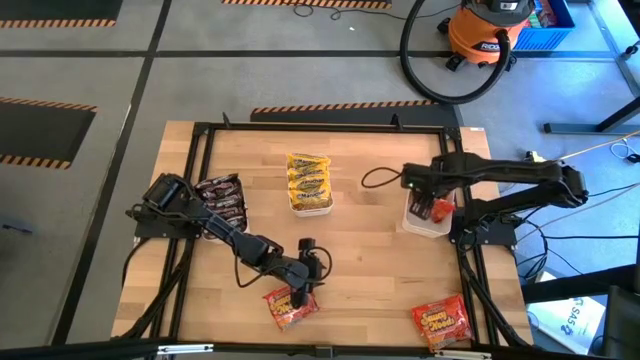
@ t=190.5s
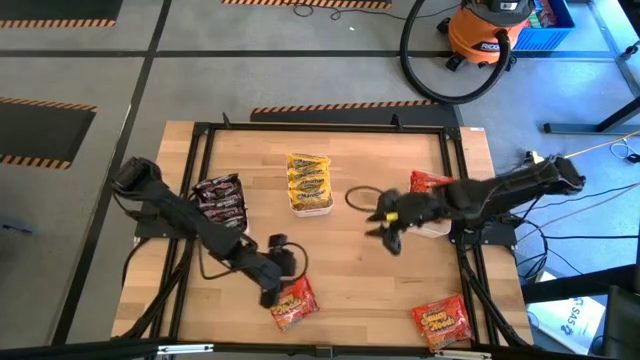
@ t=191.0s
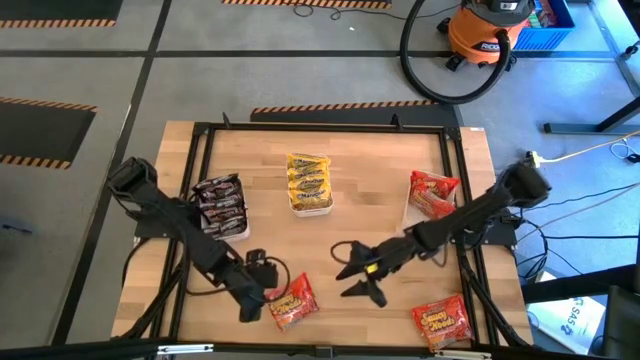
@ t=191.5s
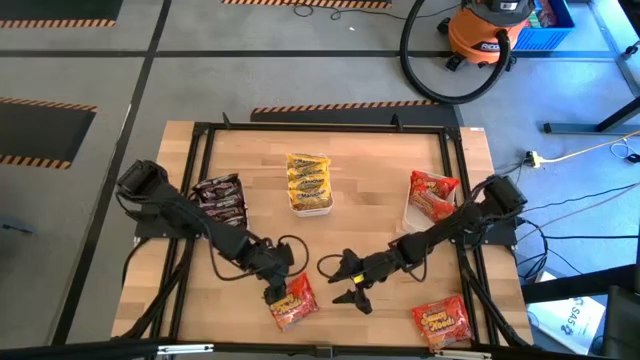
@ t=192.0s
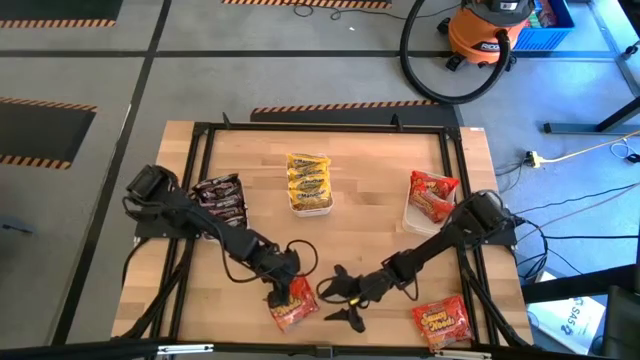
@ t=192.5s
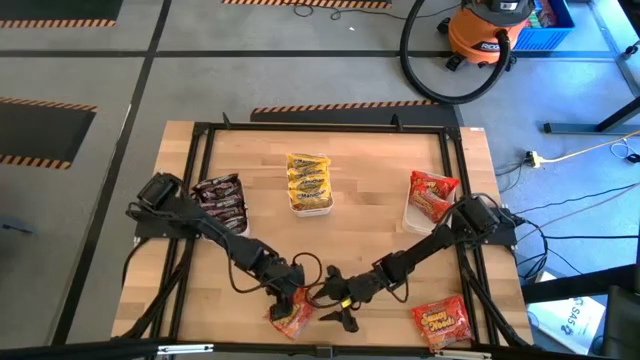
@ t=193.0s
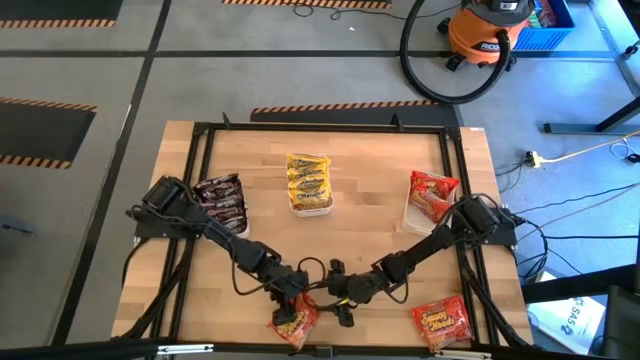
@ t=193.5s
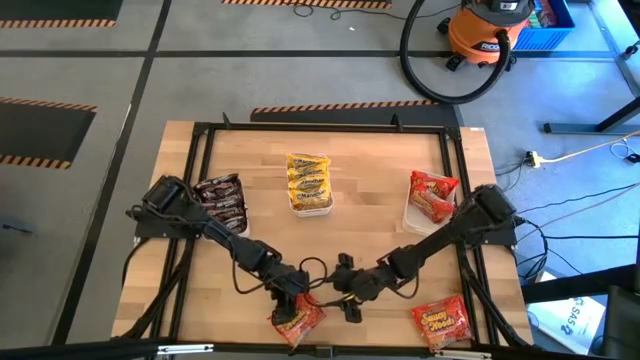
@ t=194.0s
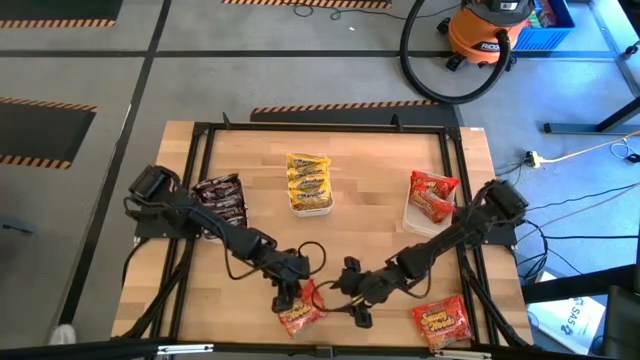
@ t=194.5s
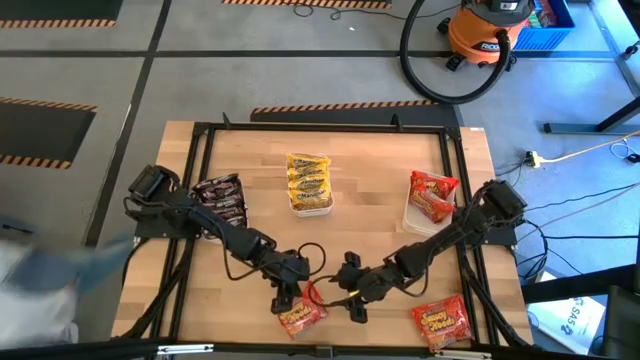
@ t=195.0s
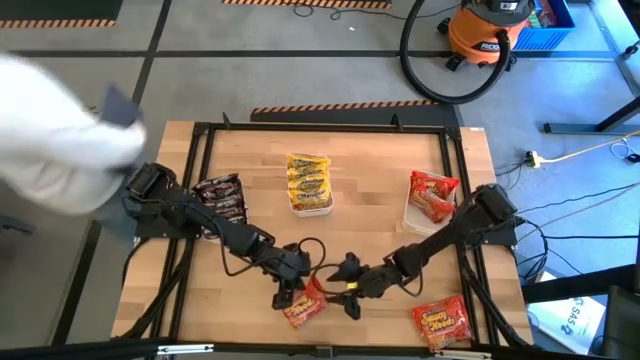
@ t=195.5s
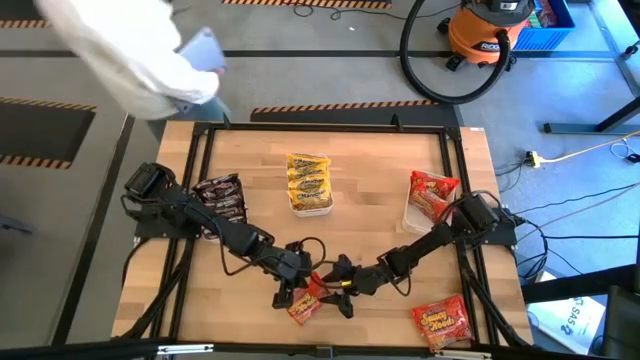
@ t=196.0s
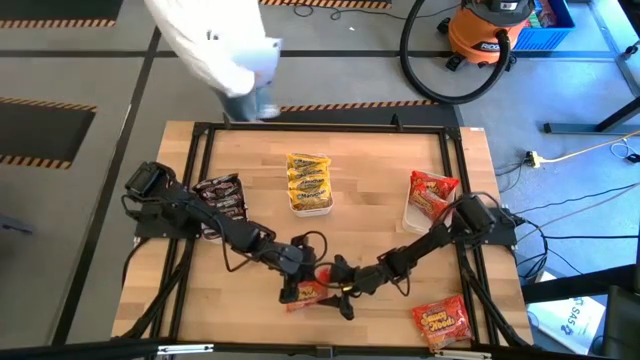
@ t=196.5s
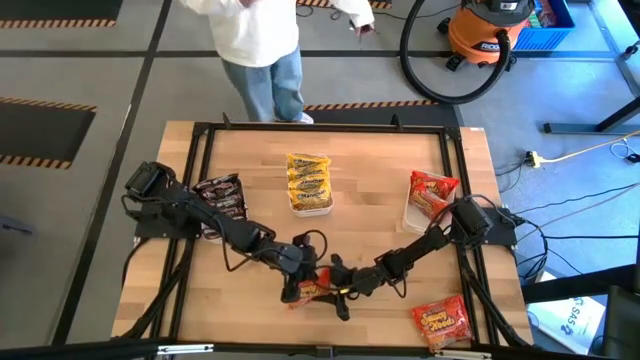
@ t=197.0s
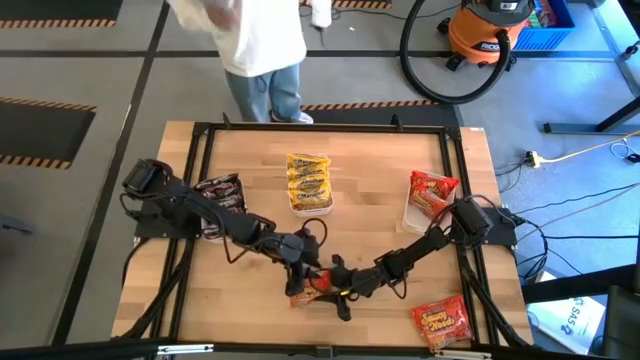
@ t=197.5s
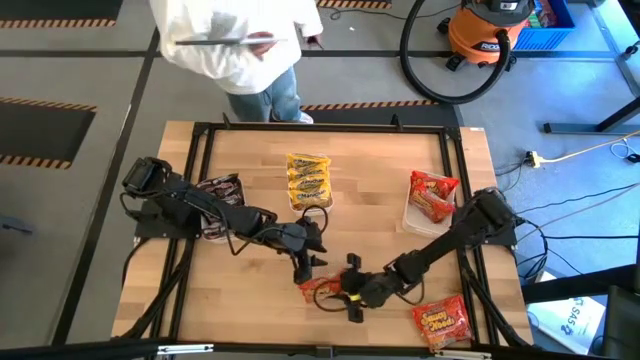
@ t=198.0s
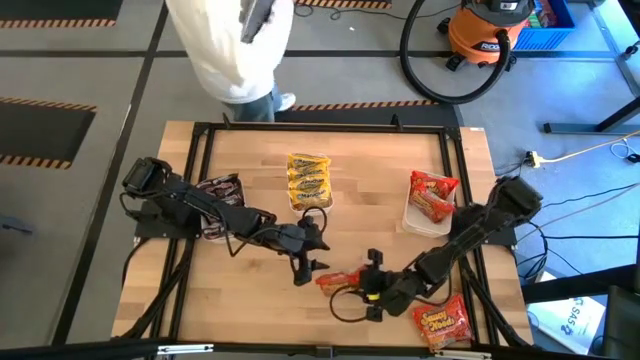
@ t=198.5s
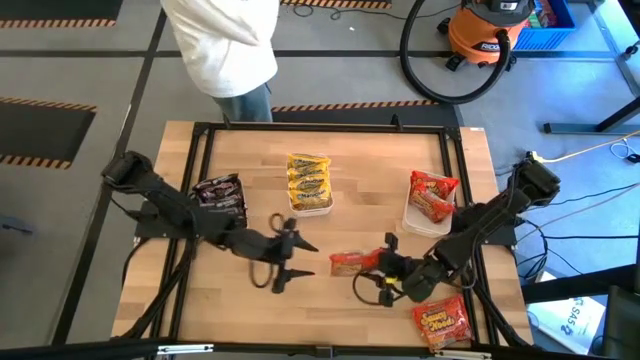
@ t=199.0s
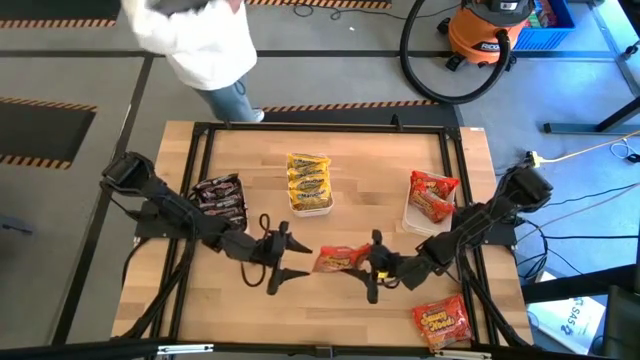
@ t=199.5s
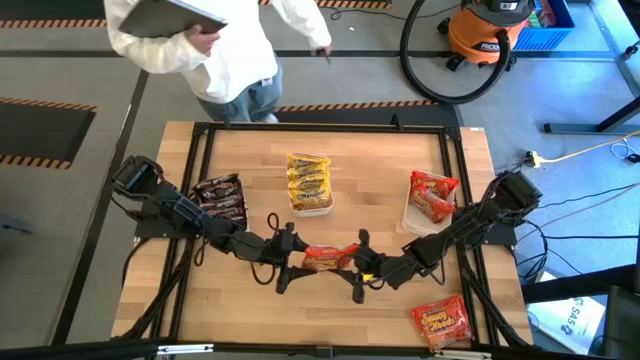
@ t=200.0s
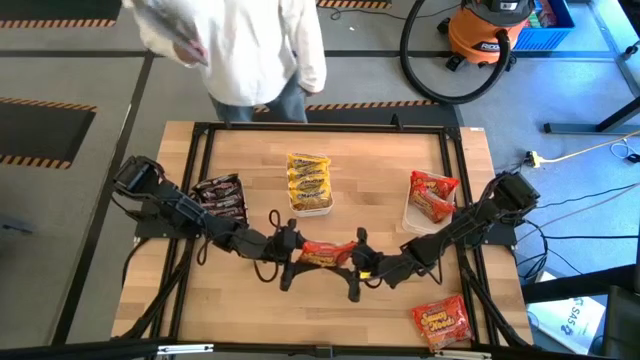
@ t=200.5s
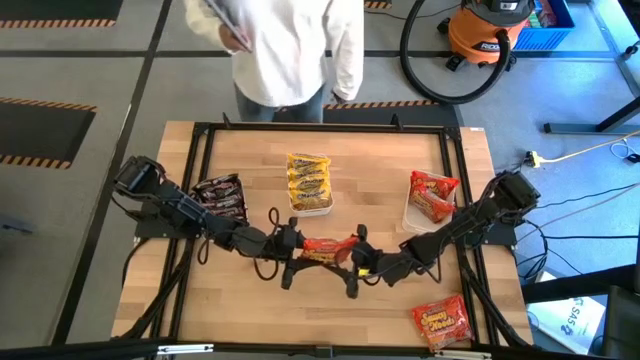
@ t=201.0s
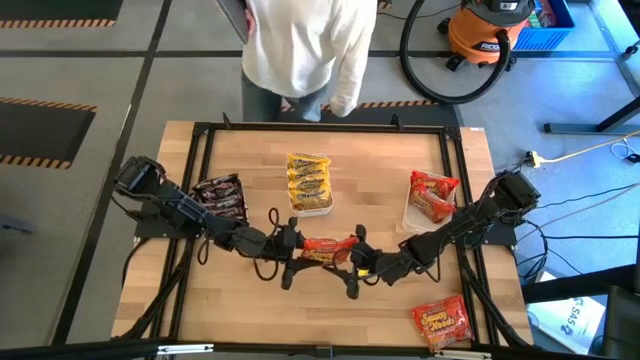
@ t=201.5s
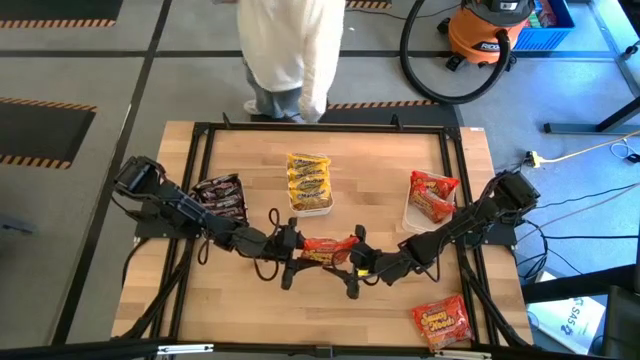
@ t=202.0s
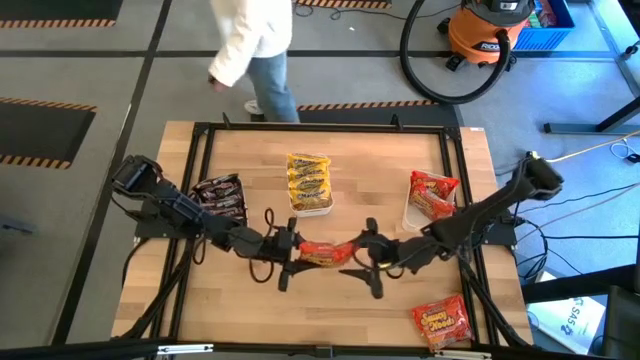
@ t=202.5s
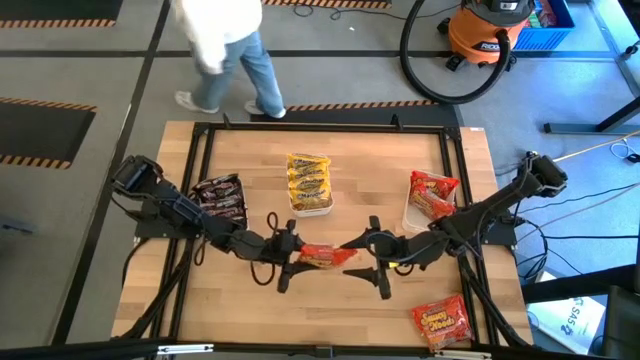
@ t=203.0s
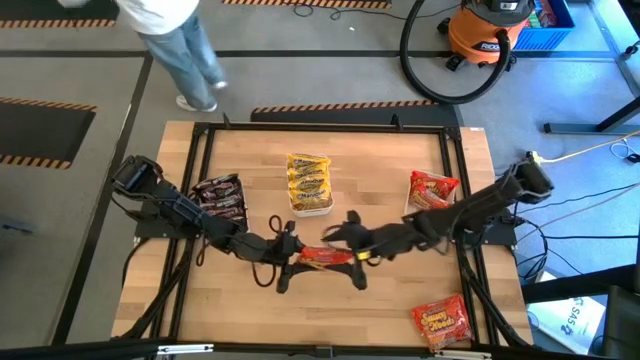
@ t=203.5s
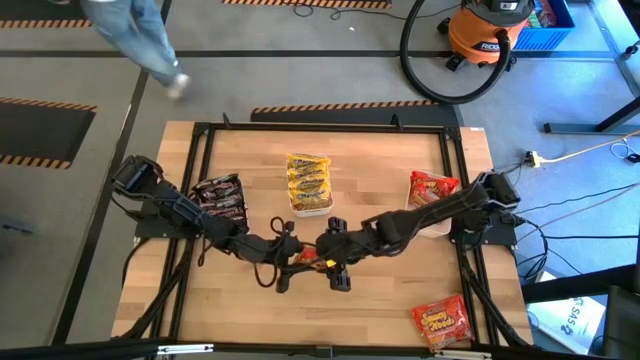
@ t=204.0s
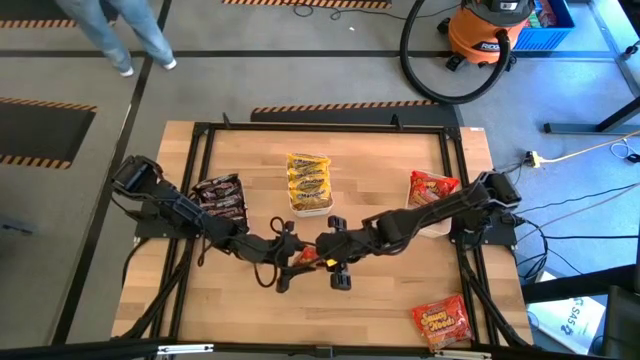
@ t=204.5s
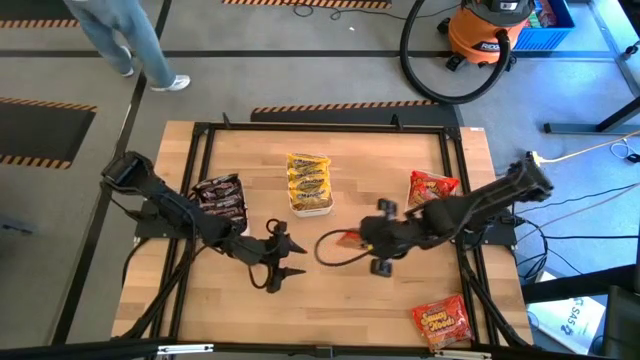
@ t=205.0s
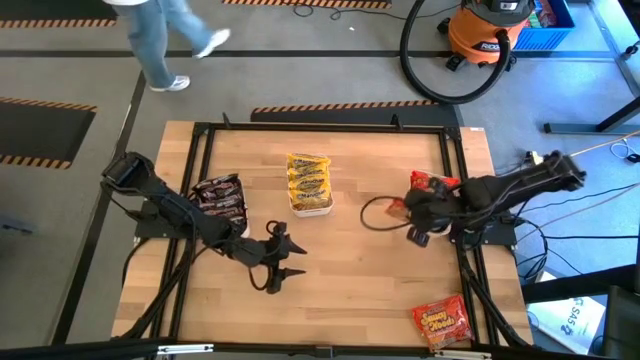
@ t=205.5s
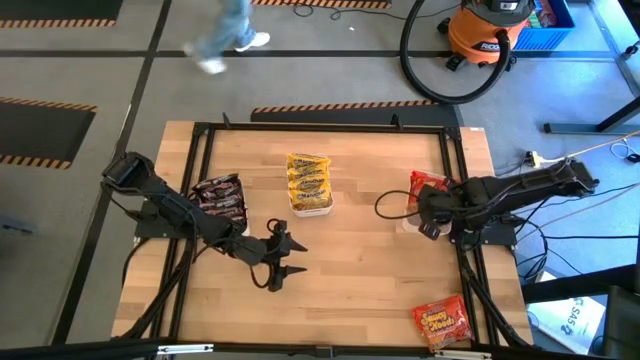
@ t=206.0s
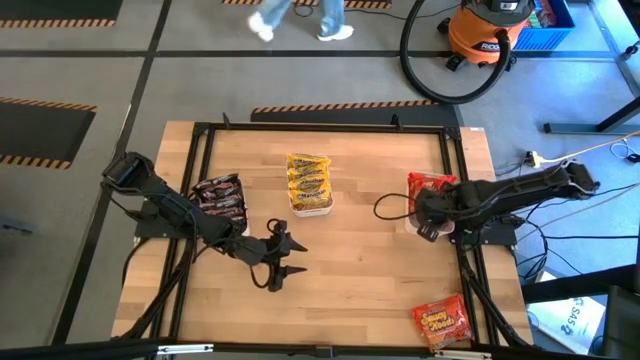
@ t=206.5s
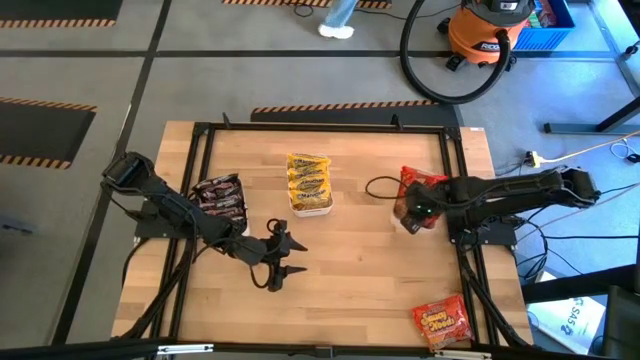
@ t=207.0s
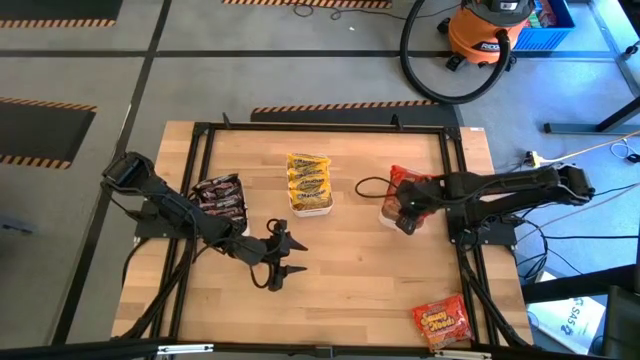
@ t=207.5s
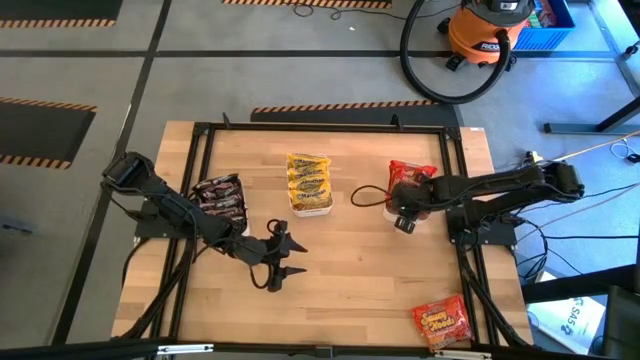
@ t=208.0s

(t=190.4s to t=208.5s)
Task: Sort Maruchan noodles
Put the left orange noodle pack into the right white bin

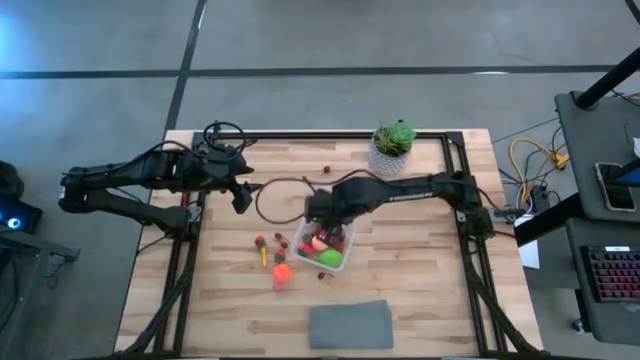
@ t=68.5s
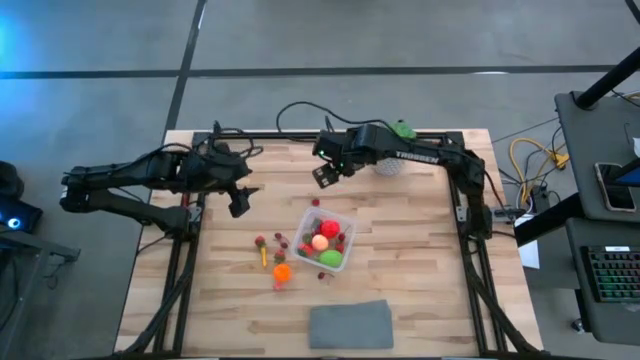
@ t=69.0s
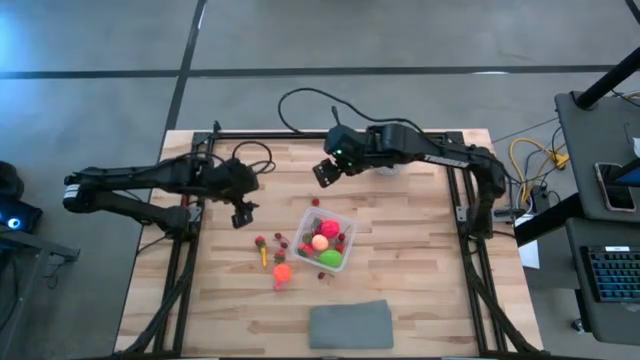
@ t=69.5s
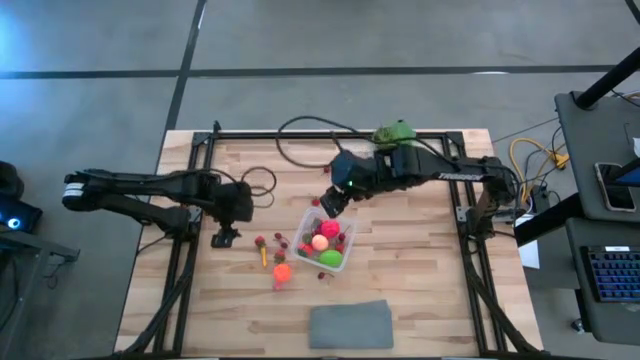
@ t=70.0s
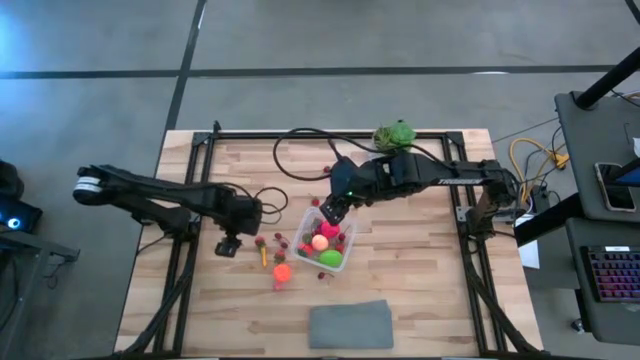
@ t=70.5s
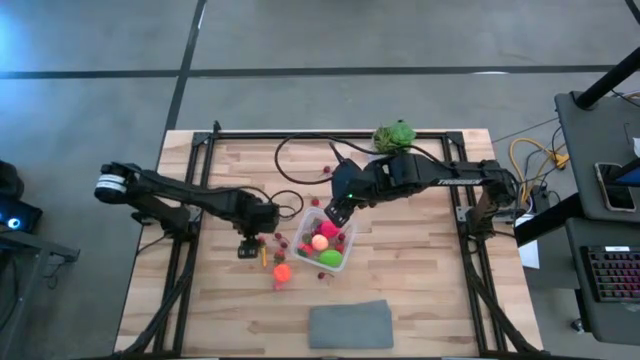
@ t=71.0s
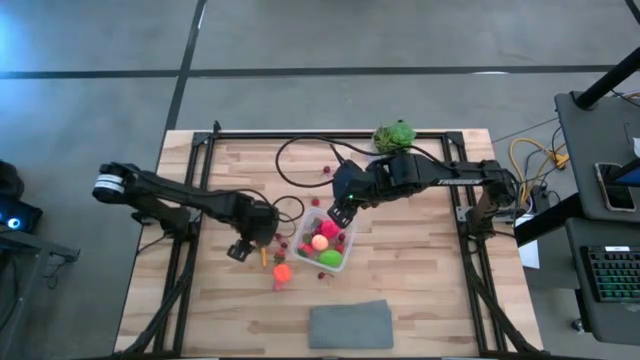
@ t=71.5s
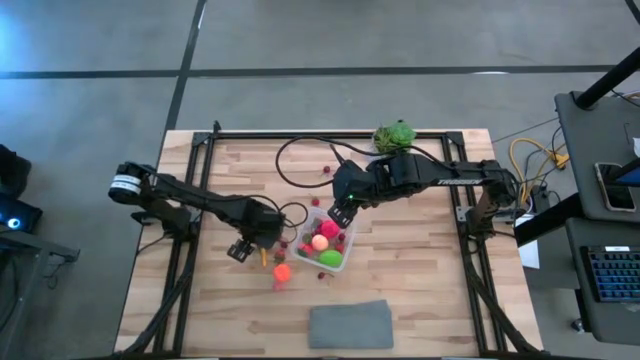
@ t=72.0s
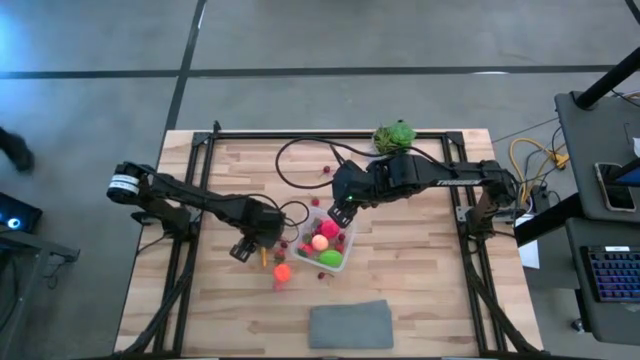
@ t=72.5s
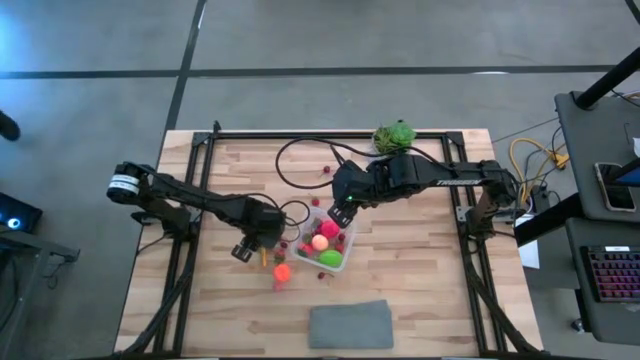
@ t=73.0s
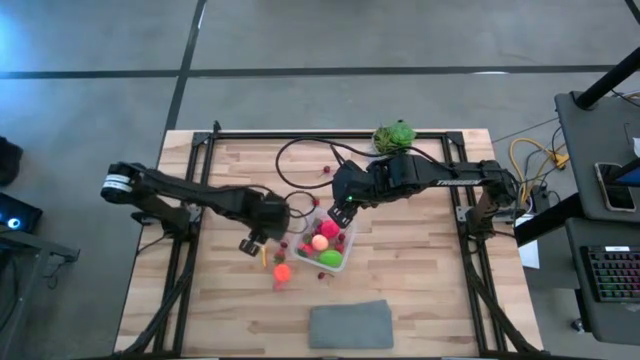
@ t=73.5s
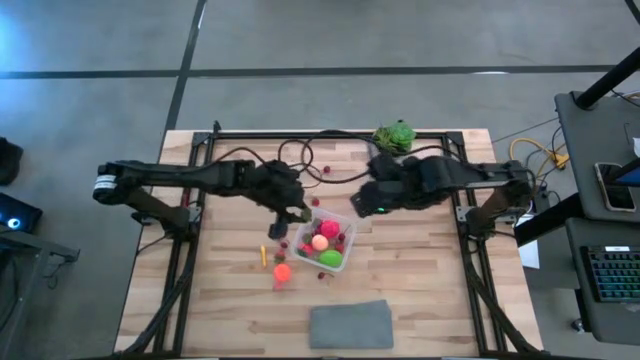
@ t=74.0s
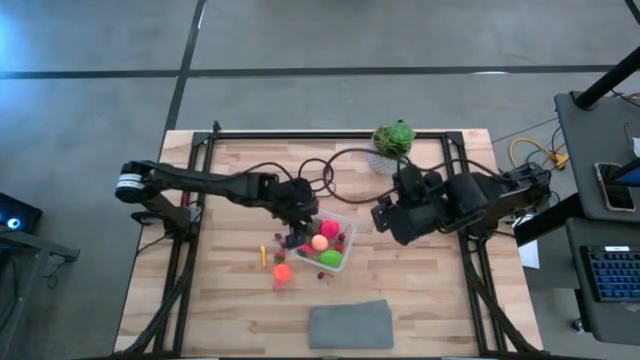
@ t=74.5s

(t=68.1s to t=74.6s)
Task: Pick and placing Produce into tupperware
Put the red strawberry into the transparent container
